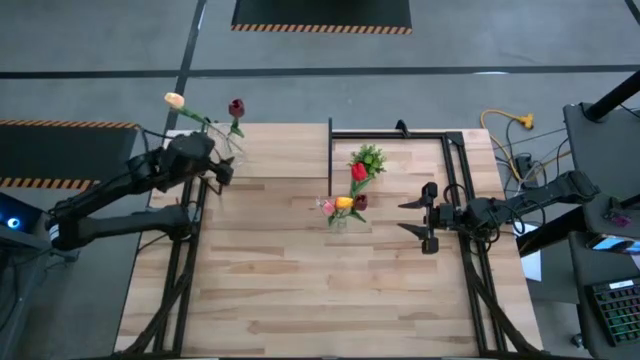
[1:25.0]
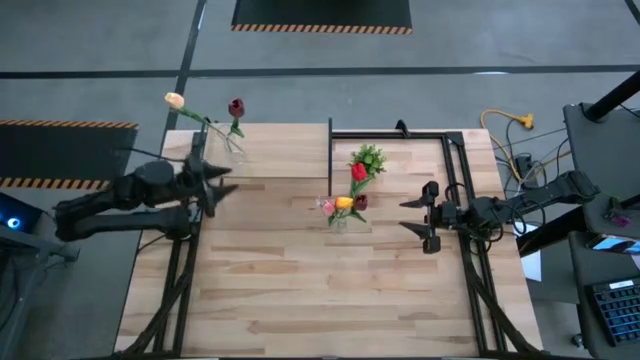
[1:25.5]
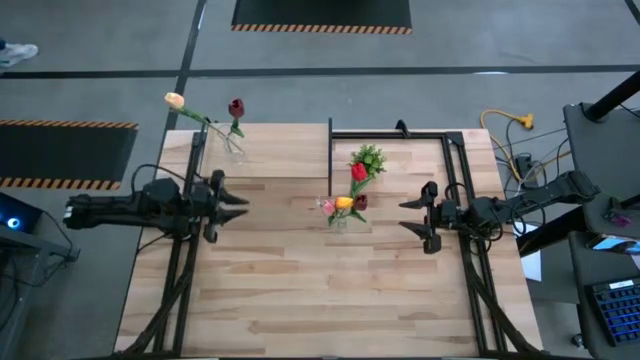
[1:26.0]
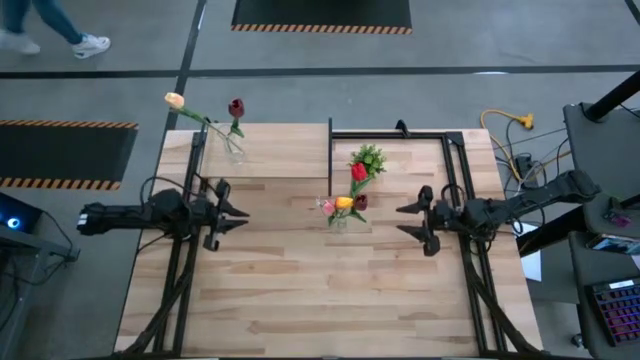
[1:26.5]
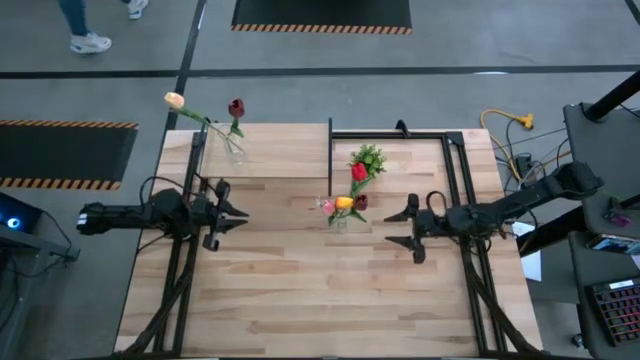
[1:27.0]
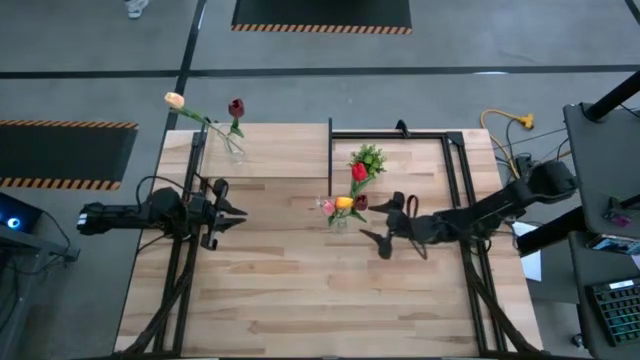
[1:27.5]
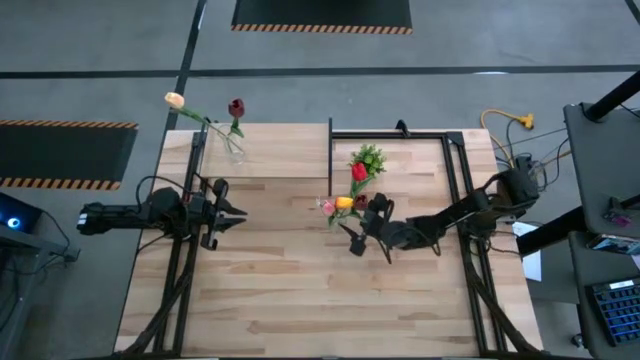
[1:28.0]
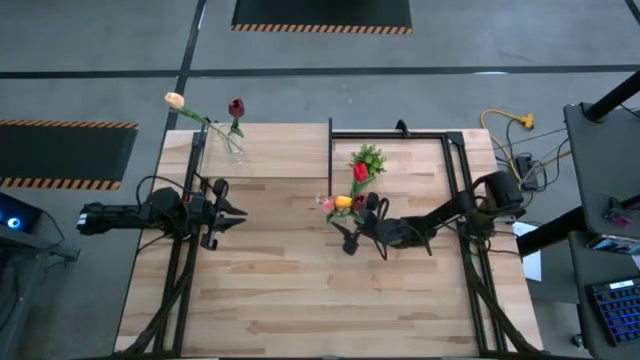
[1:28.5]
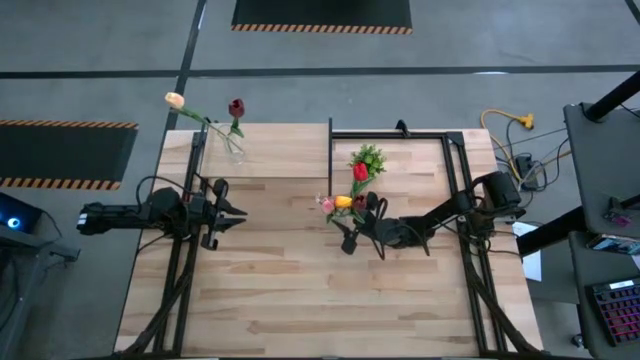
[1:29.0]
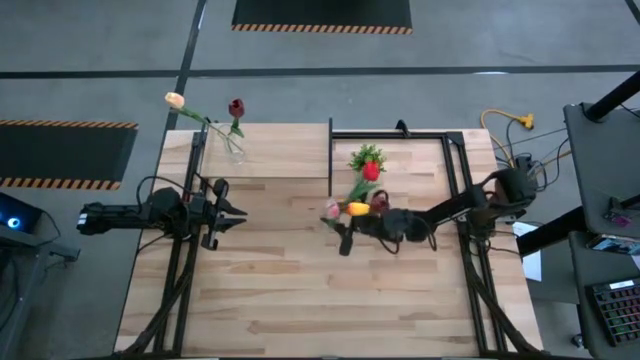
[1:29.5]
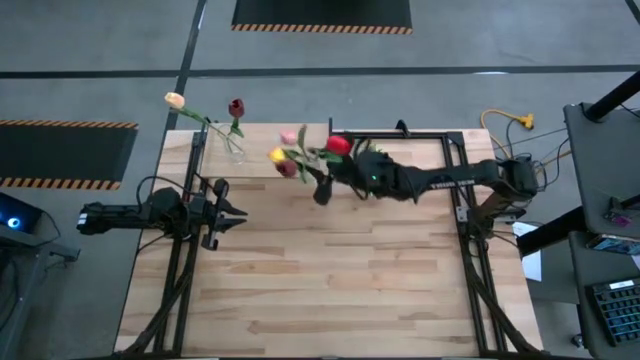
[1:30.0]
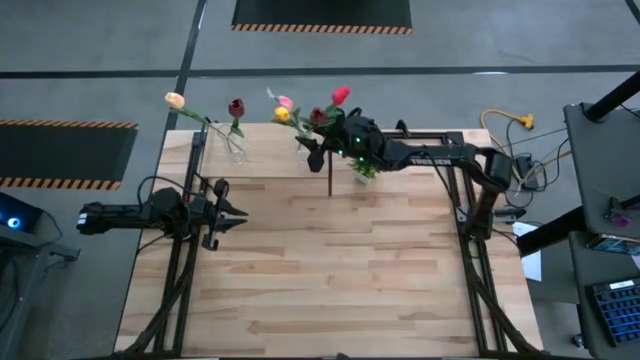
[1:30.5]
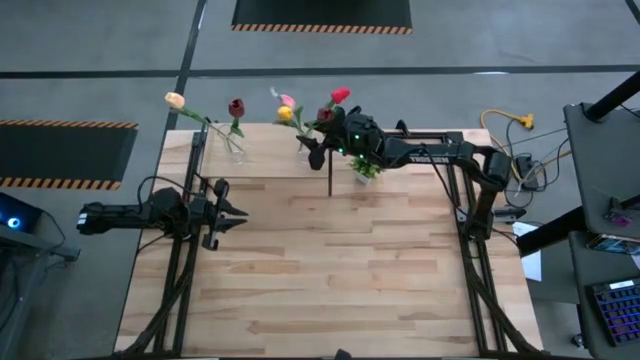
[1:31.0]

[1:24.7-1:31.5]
Task: Pick and place flowers into a vace then onto a shelf
Stack the transparent flower vase on the shelf

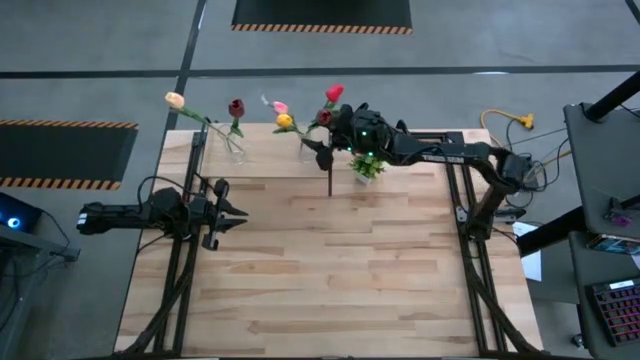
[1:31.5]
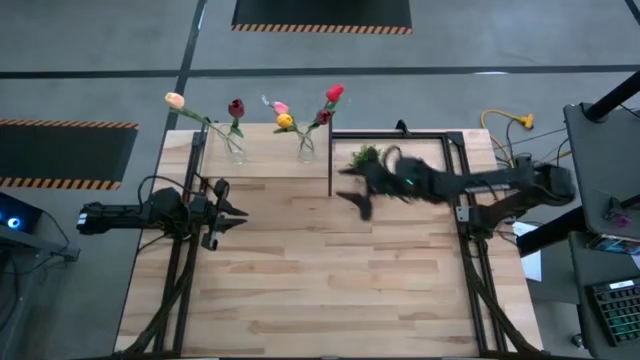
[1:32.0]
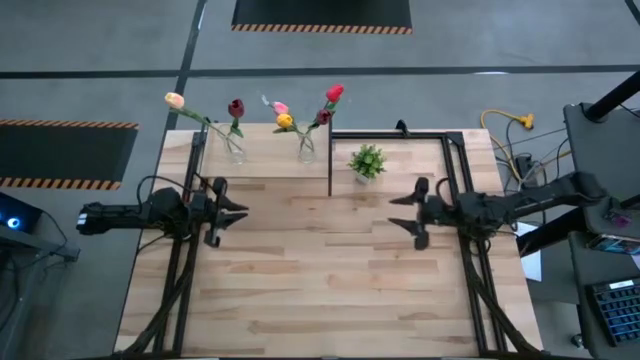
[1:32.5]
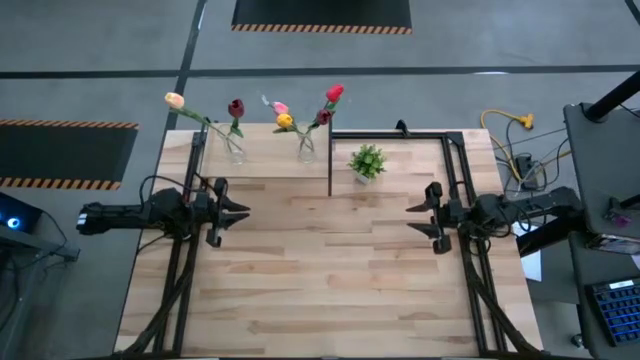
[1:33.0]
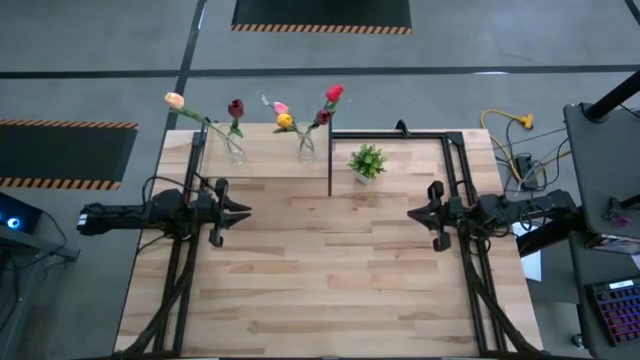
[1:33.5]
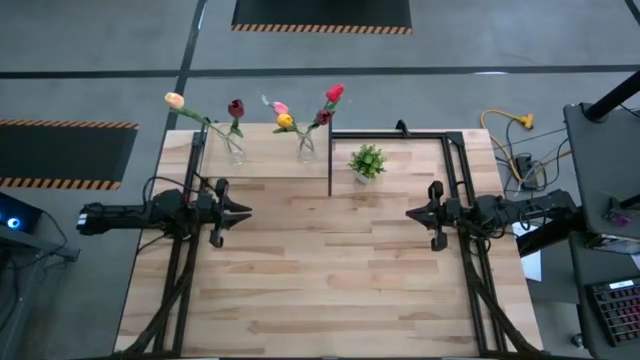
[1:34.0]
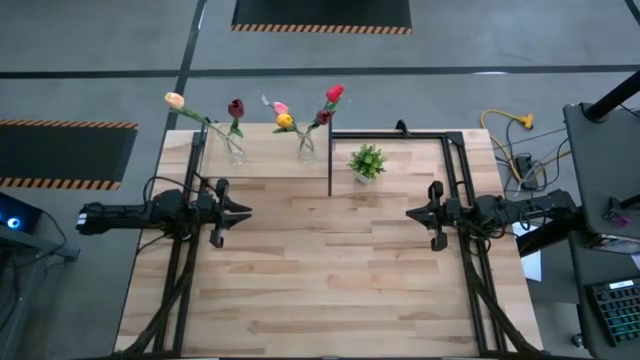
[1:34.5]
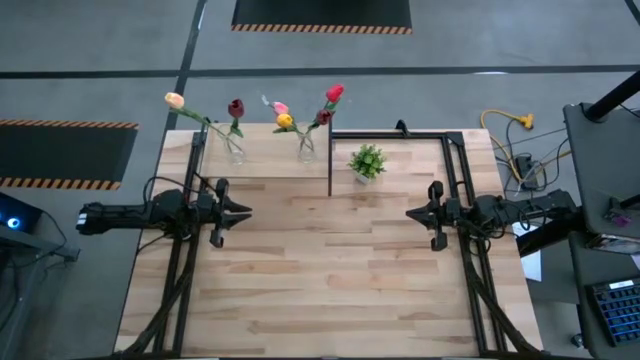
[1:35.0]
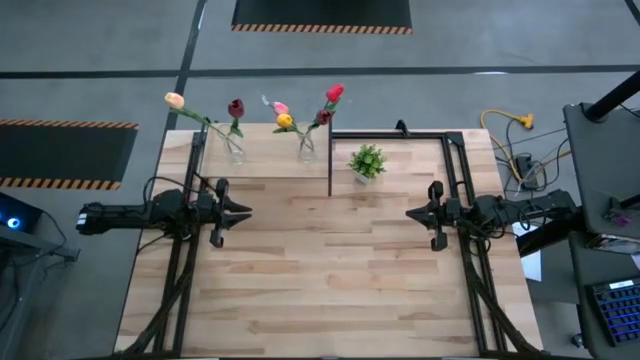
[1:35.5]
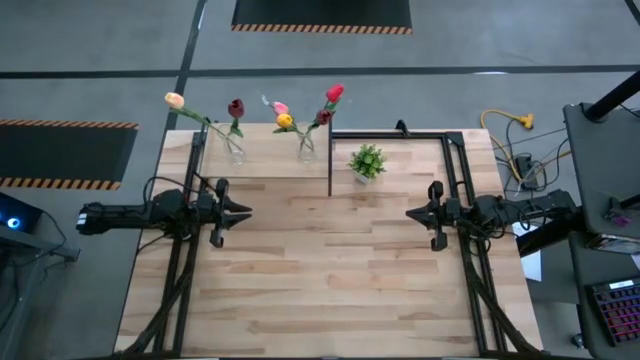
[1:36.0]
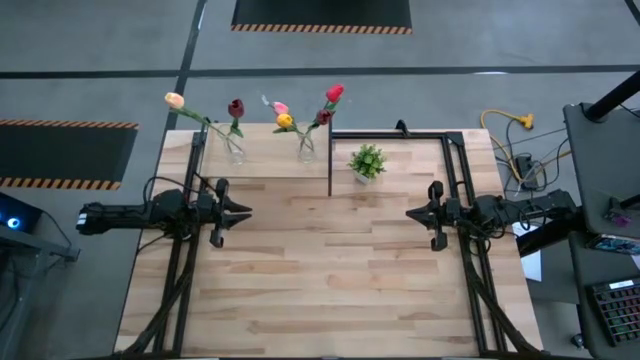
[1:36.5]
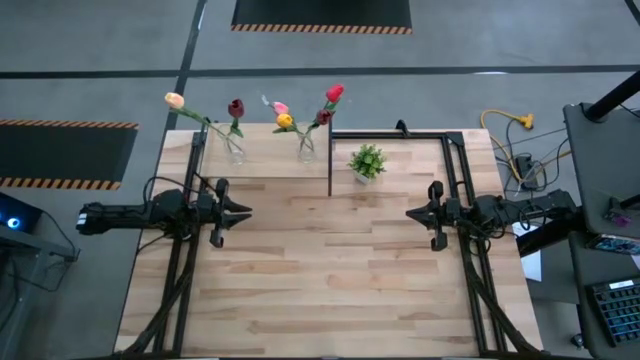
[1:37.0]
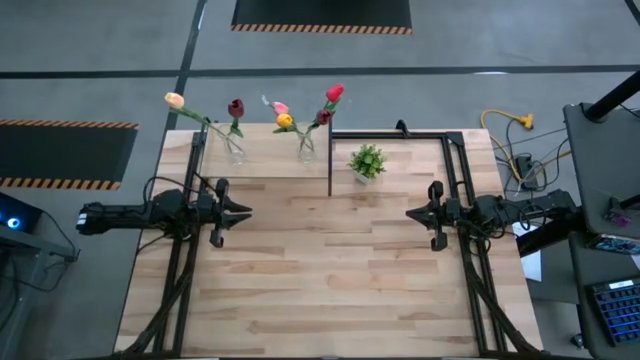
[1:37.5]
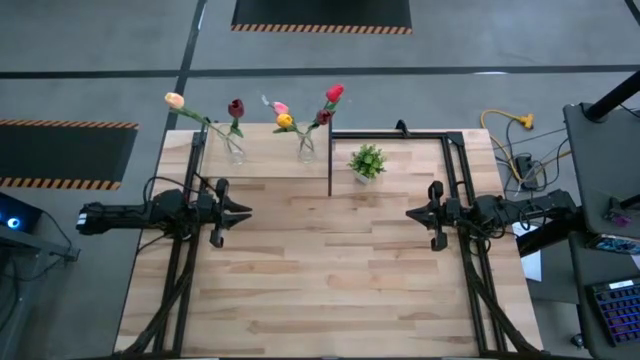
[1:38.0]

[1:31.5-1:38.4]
Return to Home Position

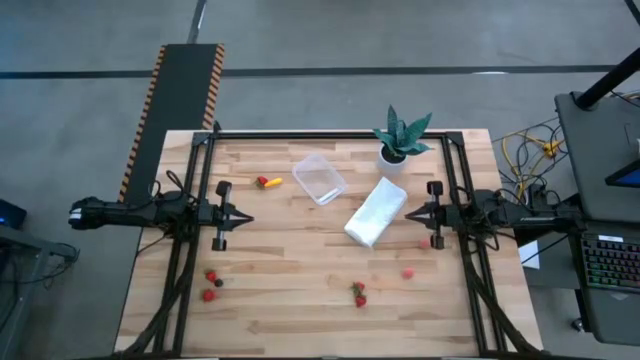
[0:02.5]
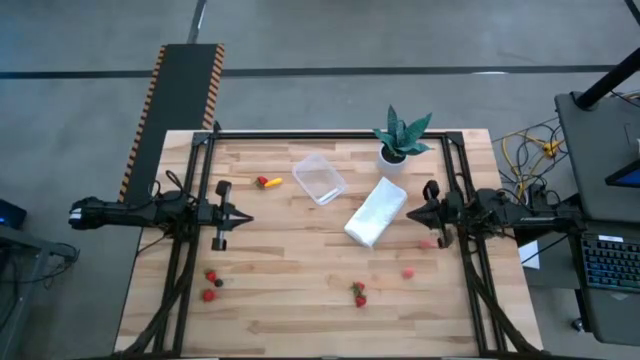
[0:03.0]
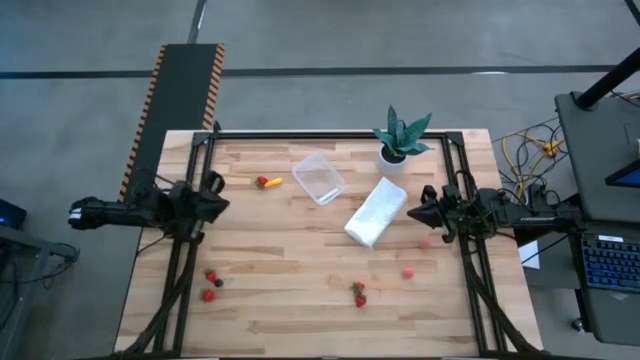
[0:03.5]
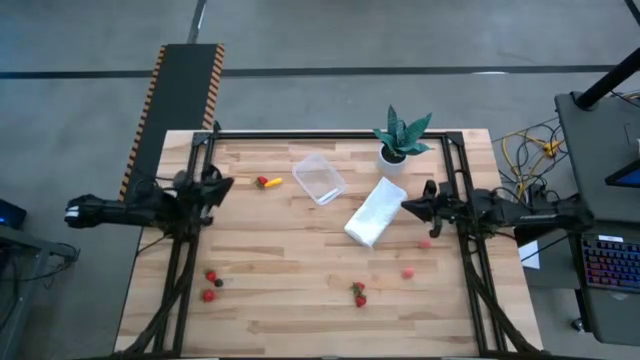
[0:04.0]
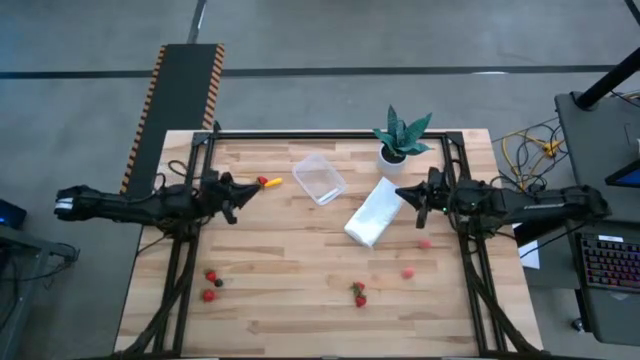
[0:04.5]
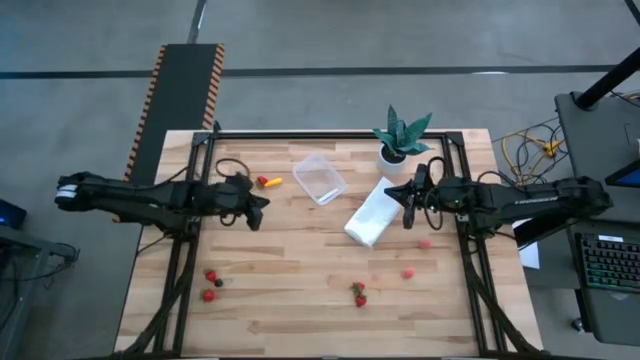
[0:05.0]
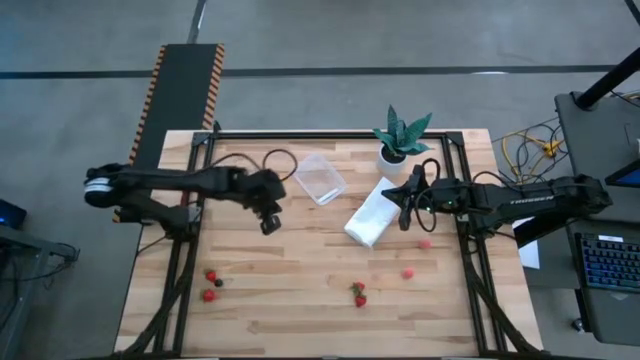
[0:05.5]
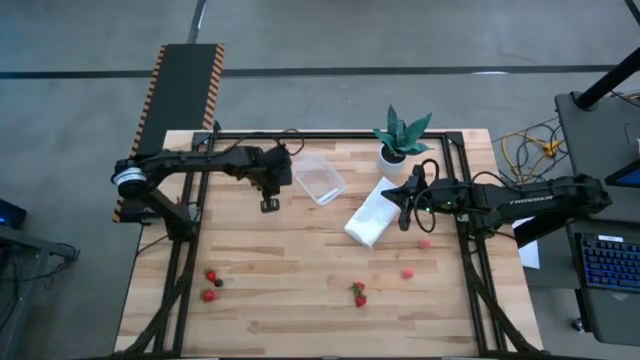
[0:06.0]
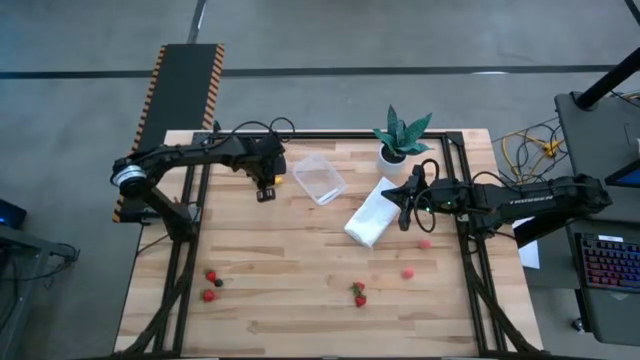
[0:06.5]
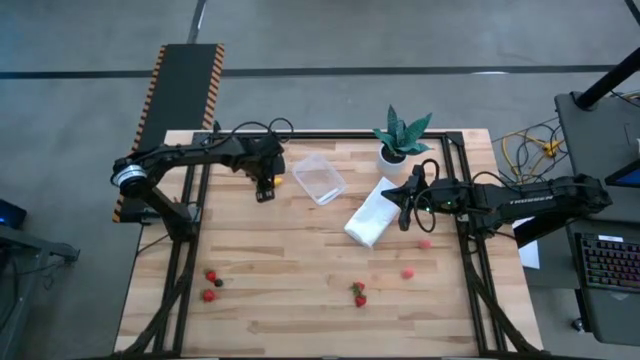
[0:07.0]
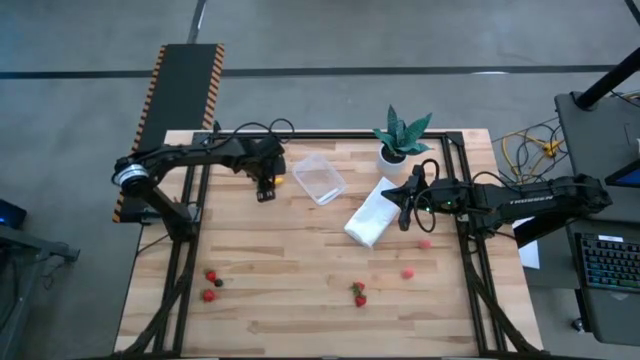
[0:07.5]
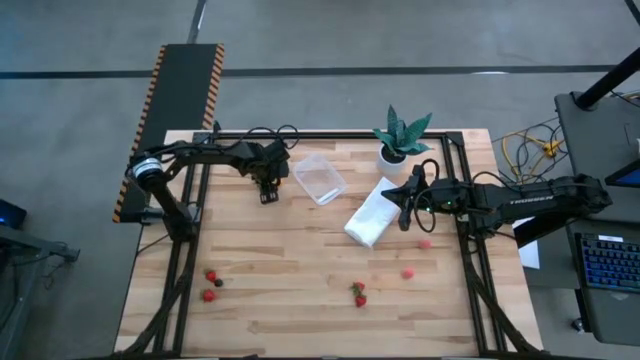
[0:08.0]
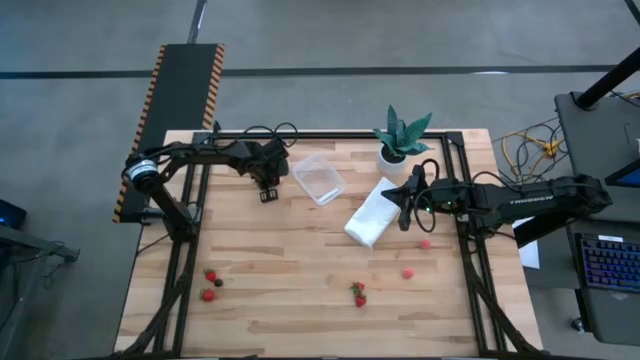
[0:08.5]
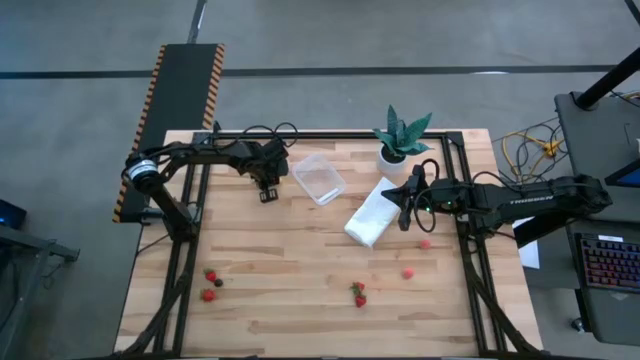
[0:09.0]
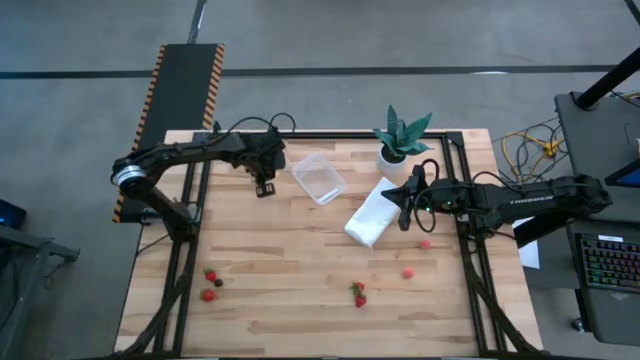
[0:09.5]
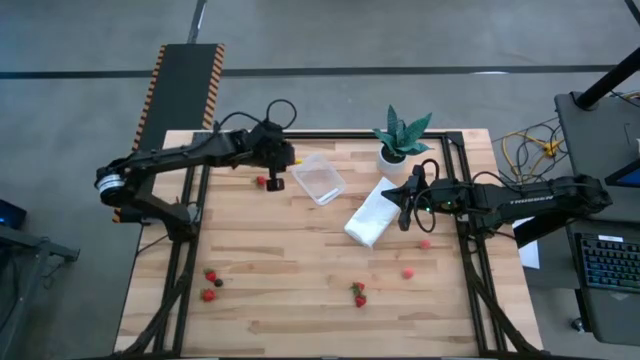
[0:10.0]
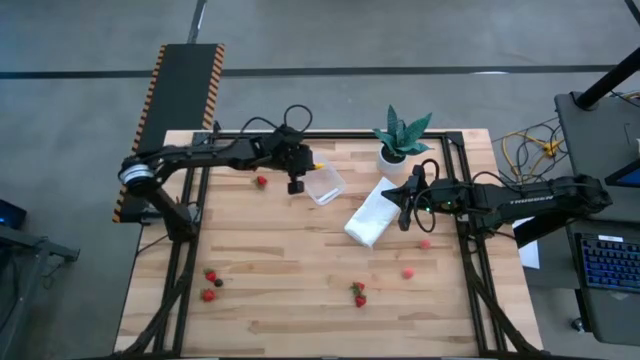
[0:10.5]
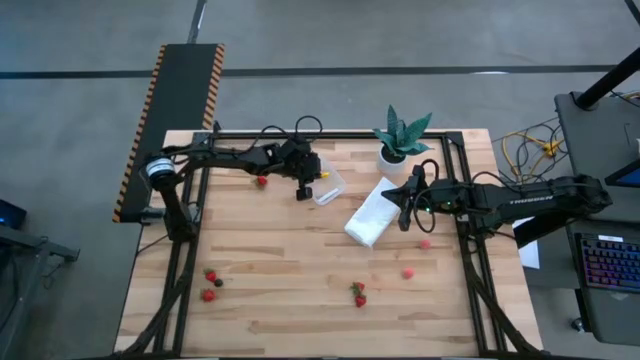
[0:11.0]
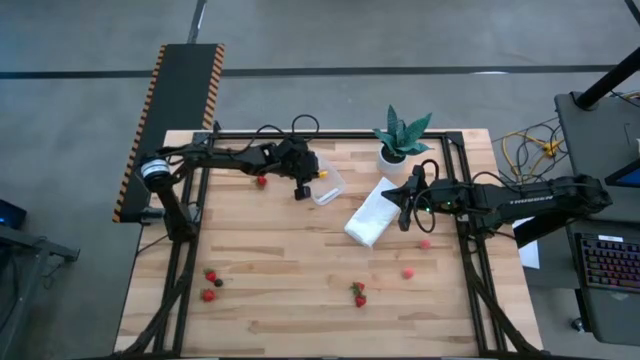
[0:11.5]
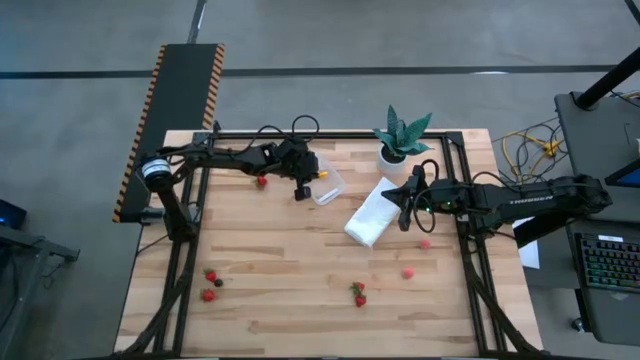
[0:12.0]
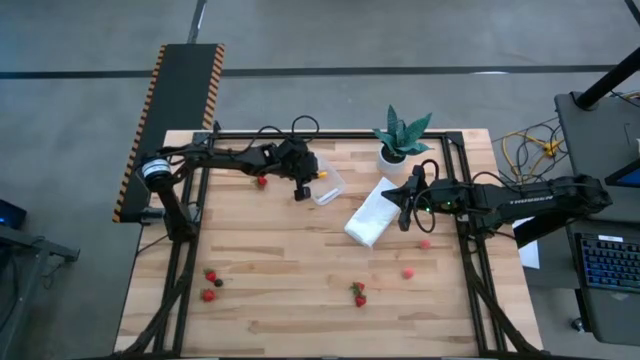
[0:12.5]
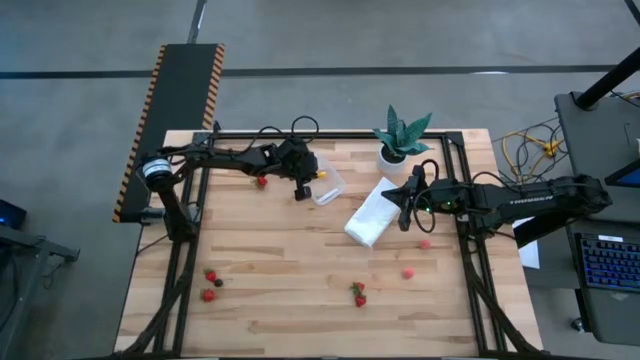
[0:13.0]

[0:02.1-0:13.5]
Task: Pick and placing Produce into tupperware
Put the corn into the transparent bin
